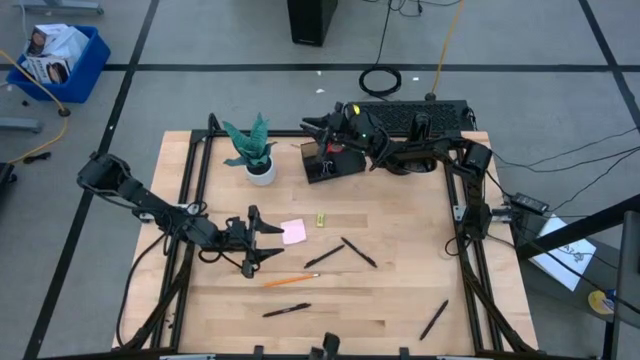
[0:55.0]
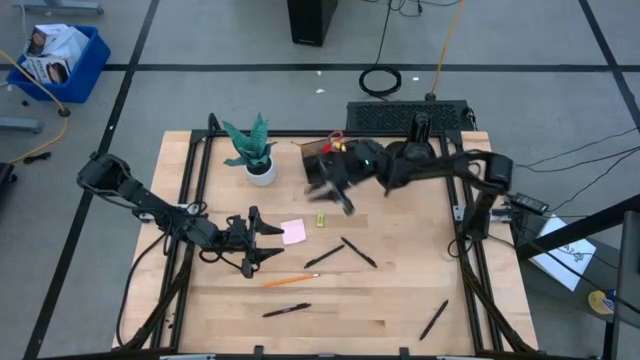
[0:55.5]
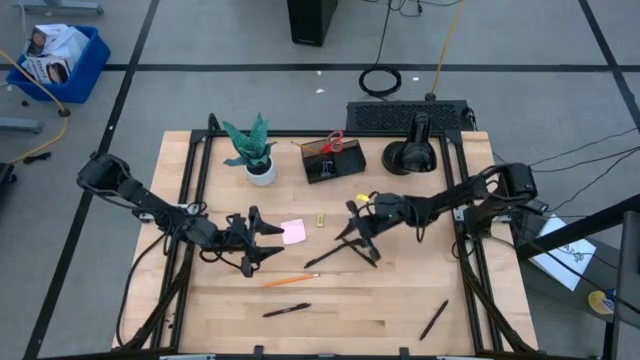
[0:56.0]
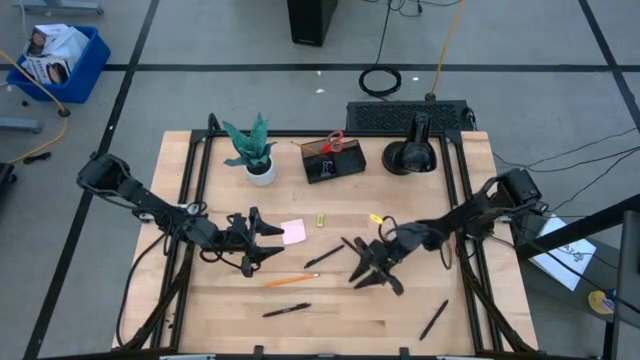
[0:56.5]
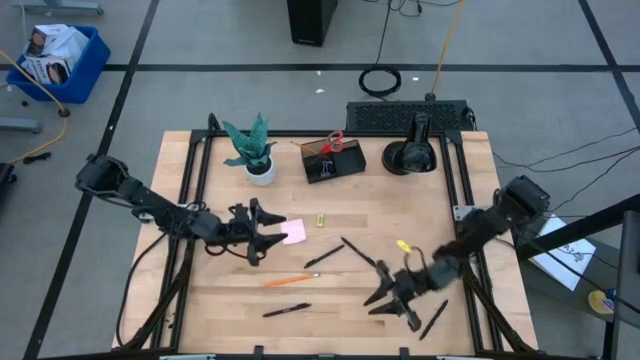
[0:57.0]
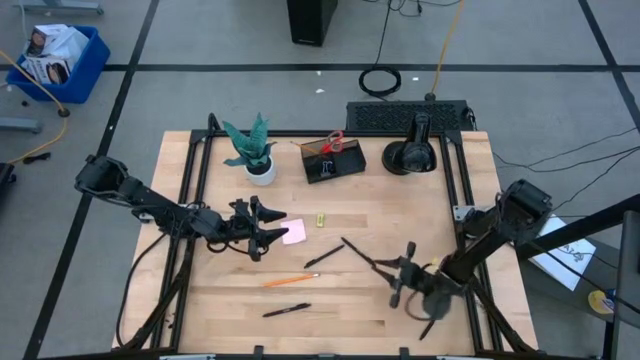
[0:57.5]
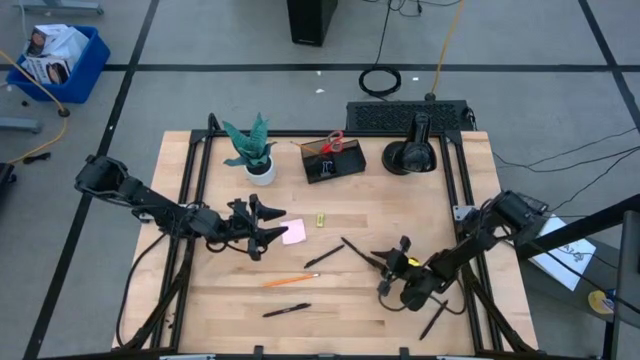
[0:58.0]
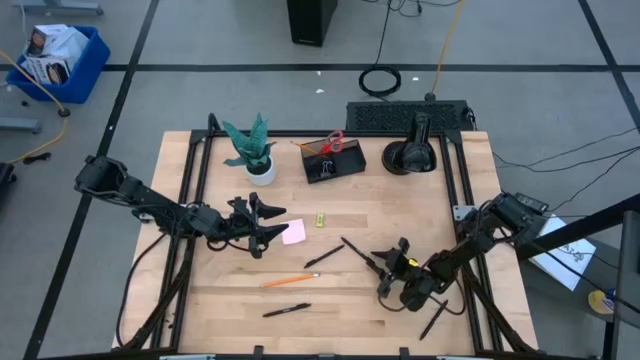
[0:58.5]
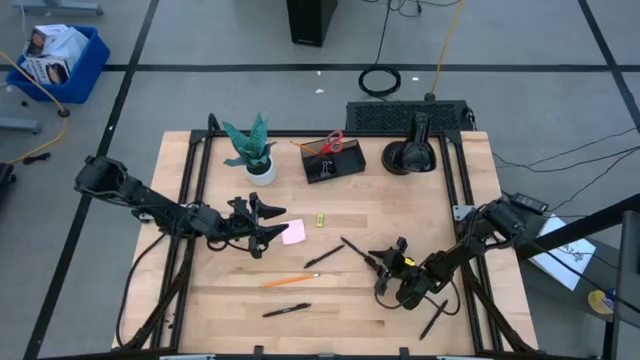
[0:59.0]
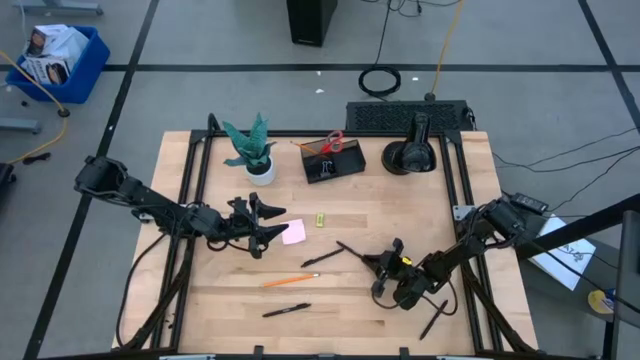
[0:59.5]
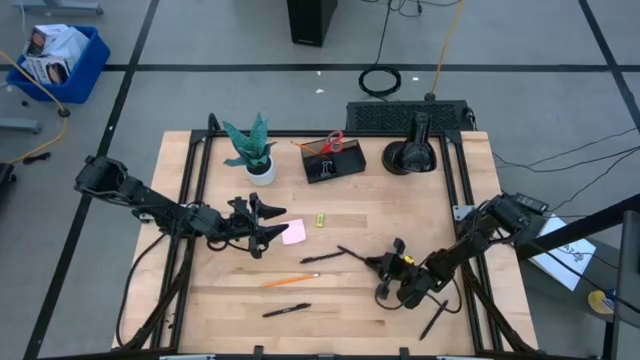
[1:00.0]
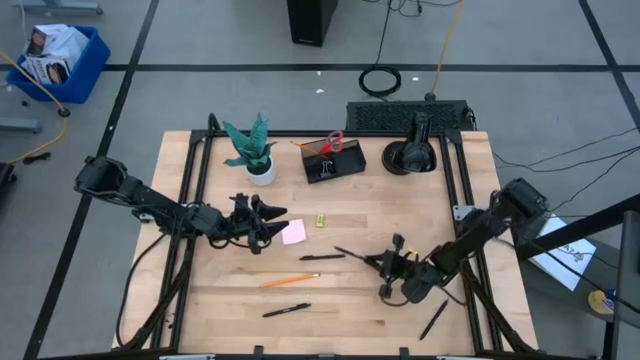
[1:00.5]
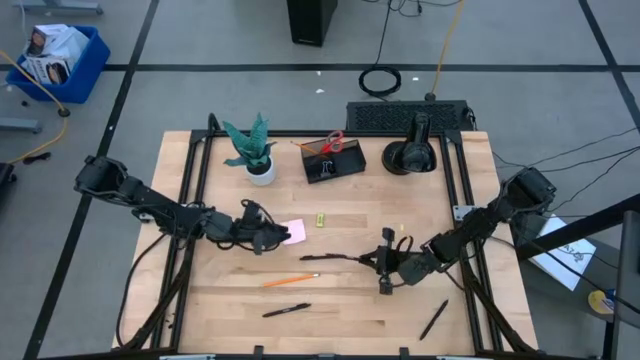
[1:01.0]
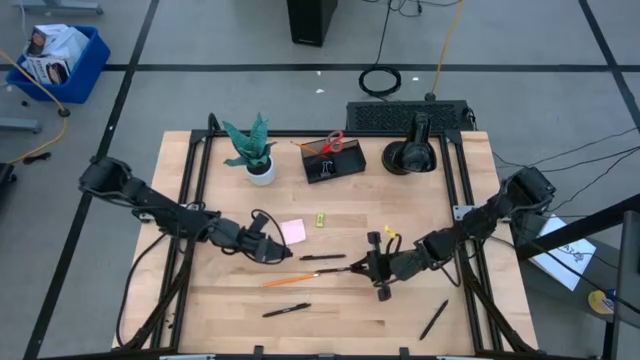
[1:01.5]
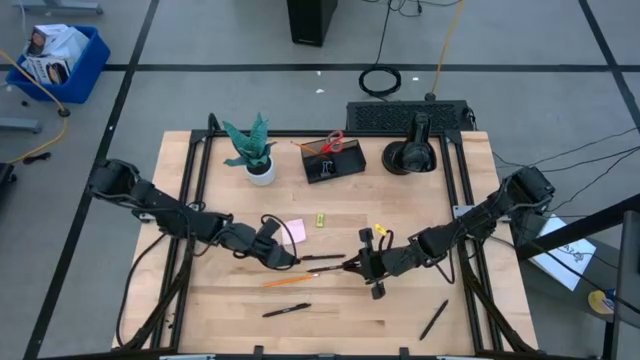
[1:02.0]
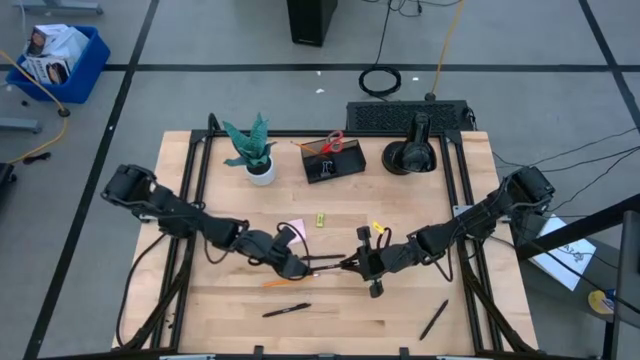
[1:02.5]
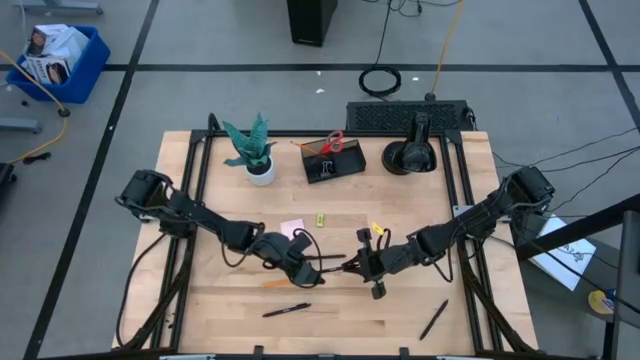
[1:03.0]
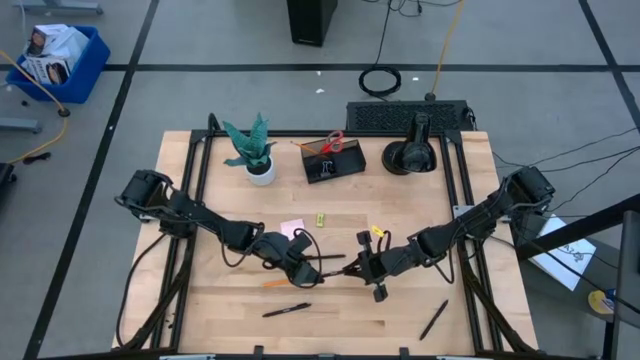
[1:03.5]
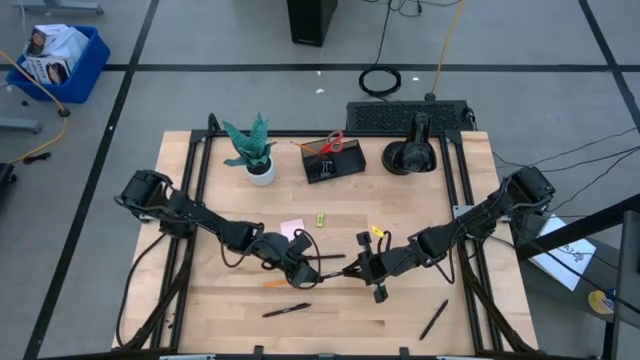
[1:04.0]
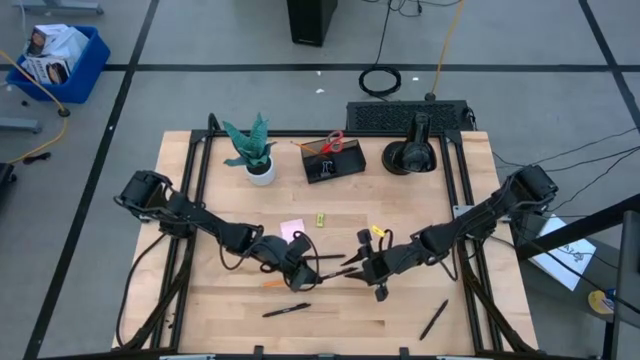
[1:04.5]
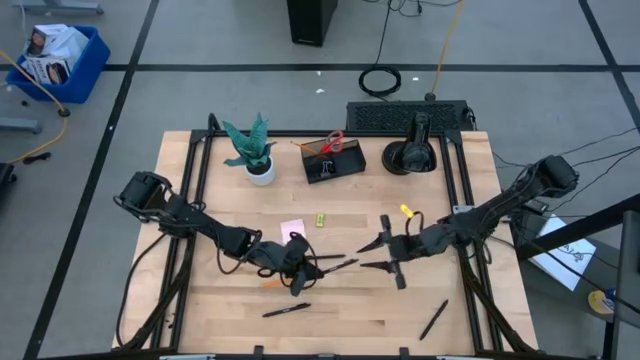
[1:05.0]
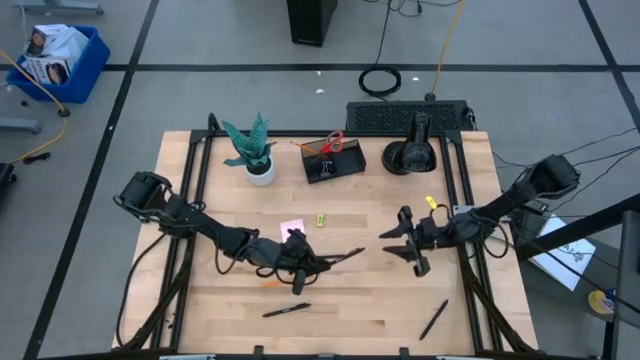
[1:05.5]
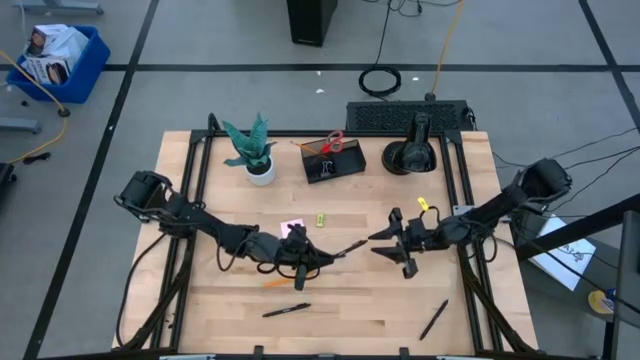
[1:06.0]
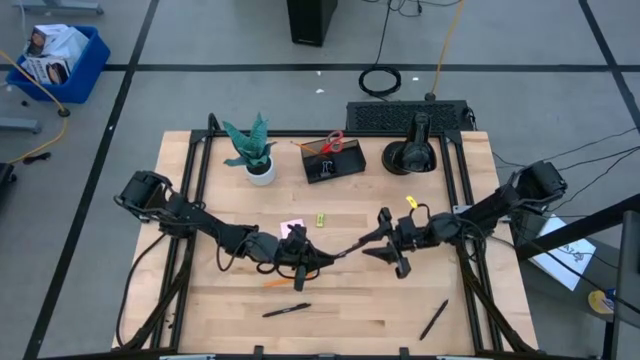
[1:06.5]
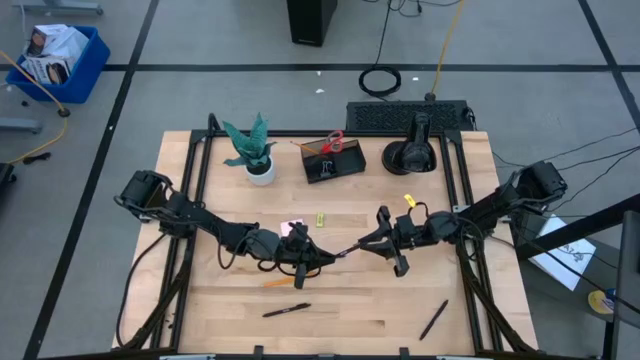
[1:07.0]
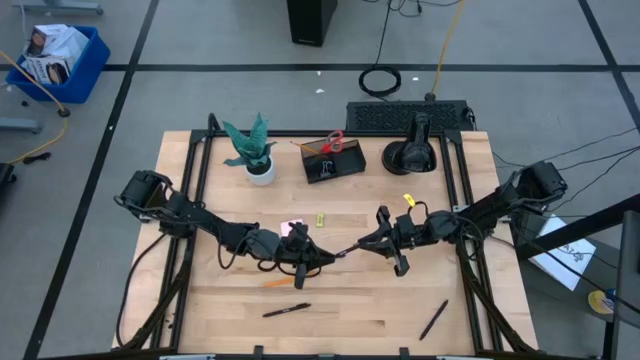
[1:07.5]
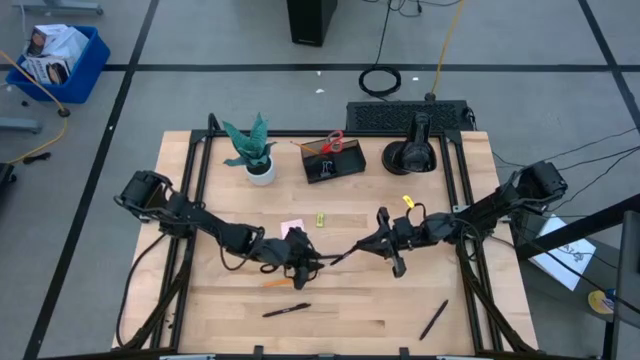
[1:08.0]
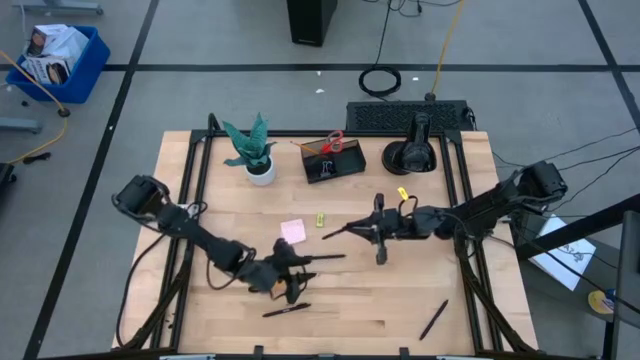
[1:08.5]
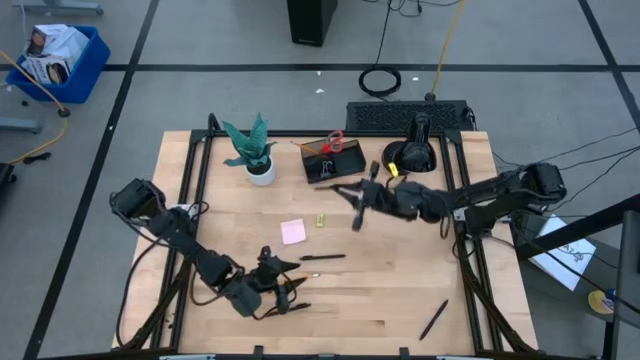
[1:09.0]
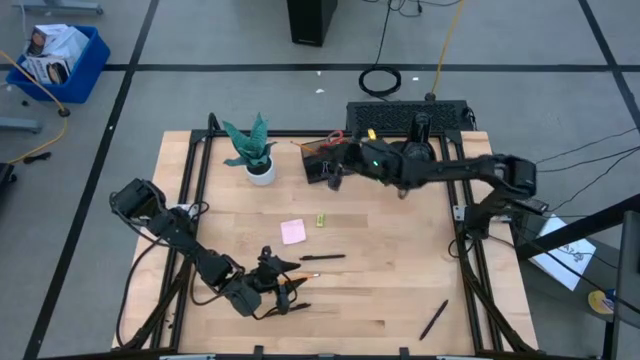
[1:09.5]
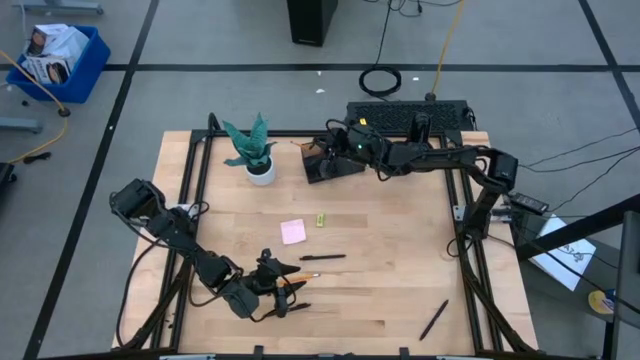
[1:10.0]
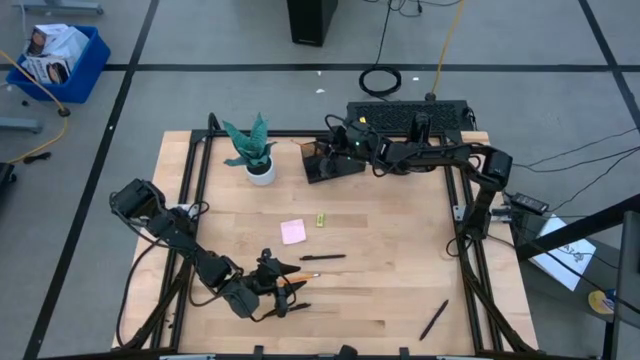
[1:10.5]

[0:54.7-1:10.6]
Task: Pick and place office supplies into organizer
Put the black pen into the black mesh desk organizer

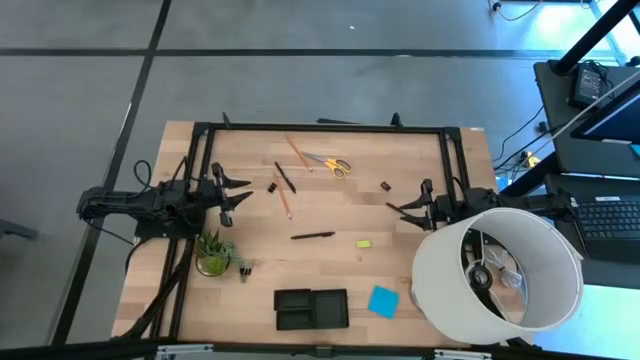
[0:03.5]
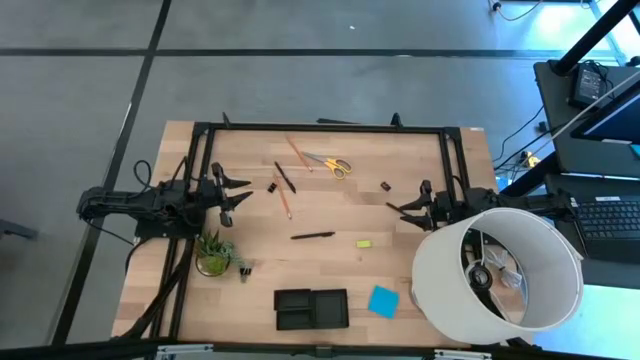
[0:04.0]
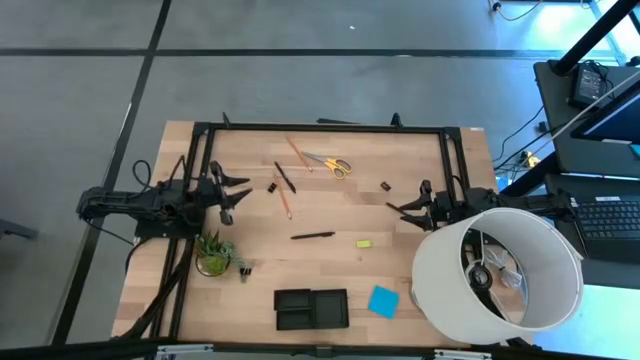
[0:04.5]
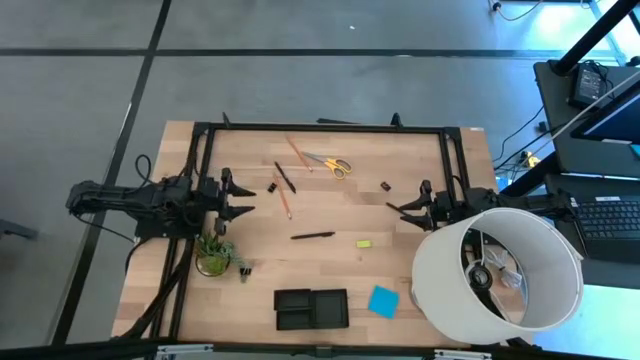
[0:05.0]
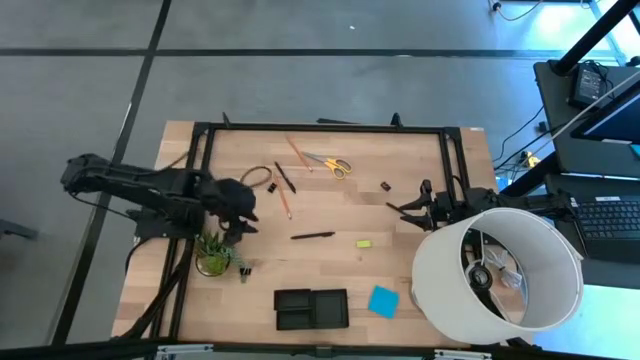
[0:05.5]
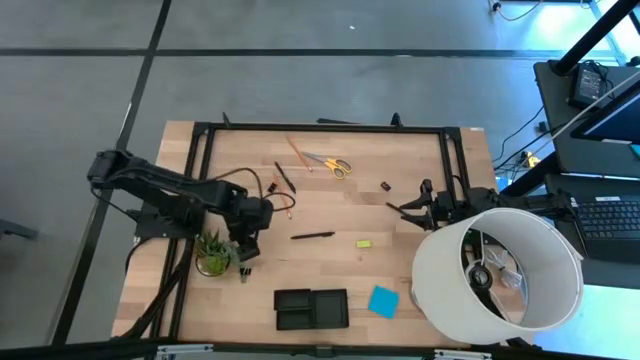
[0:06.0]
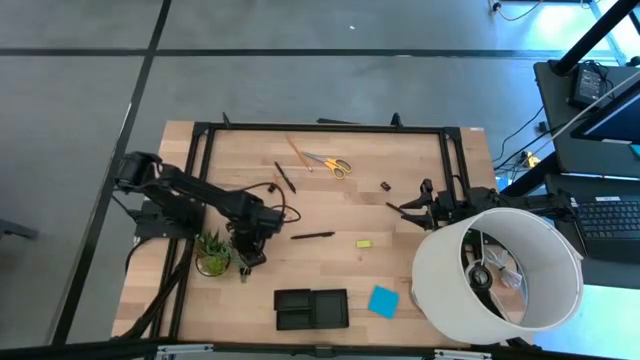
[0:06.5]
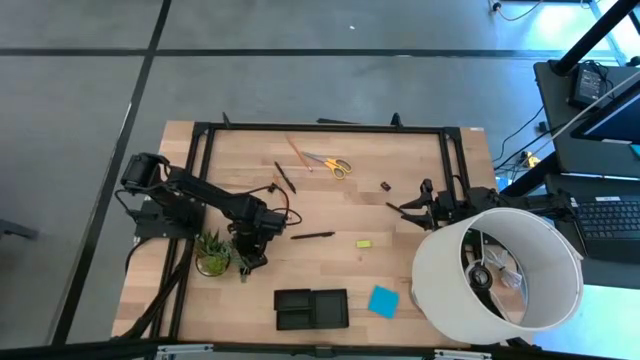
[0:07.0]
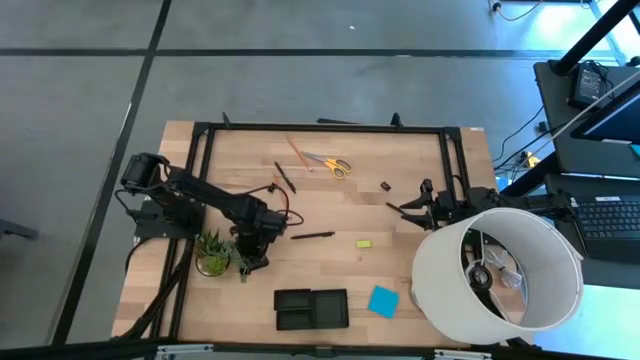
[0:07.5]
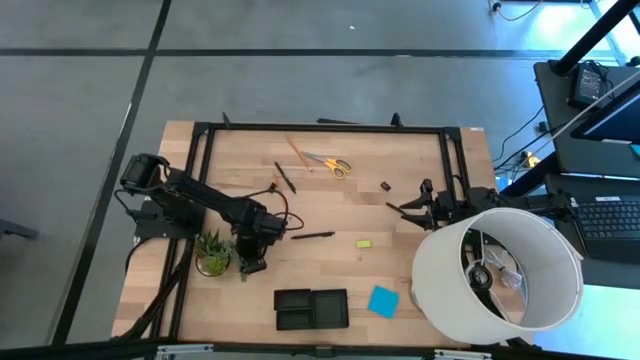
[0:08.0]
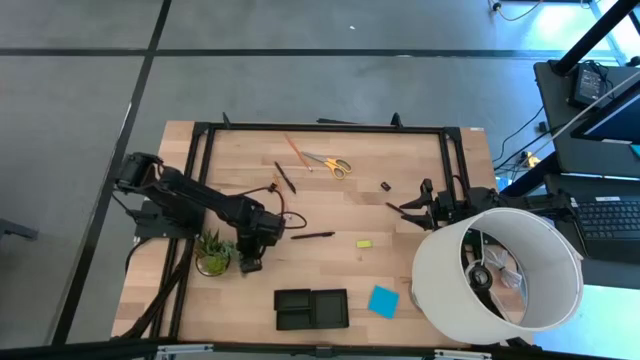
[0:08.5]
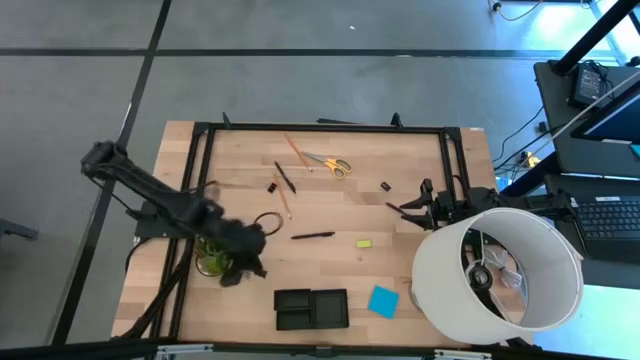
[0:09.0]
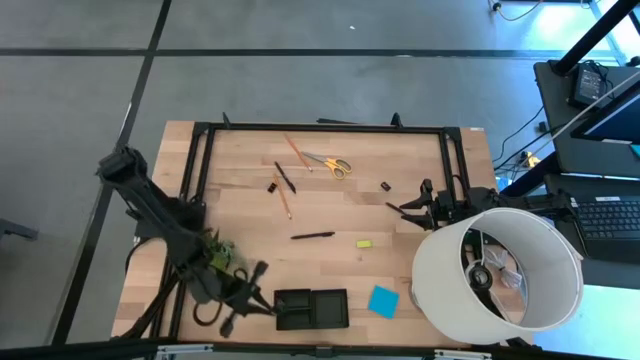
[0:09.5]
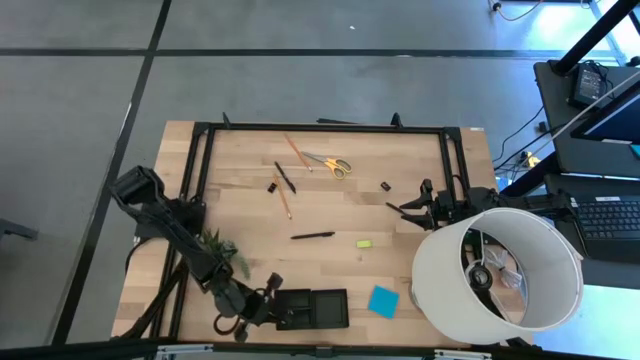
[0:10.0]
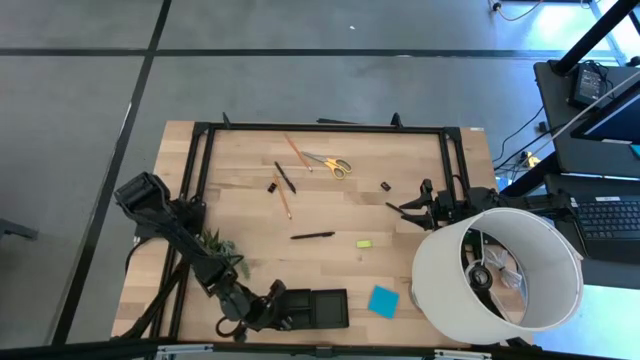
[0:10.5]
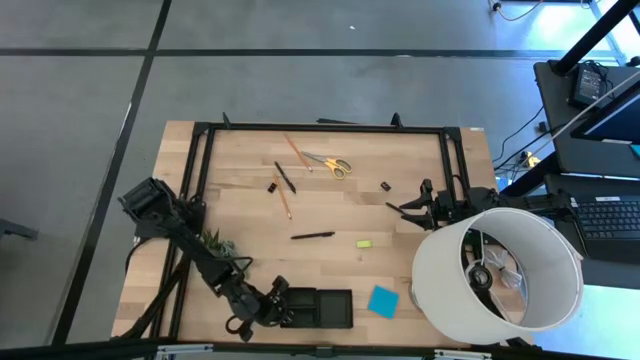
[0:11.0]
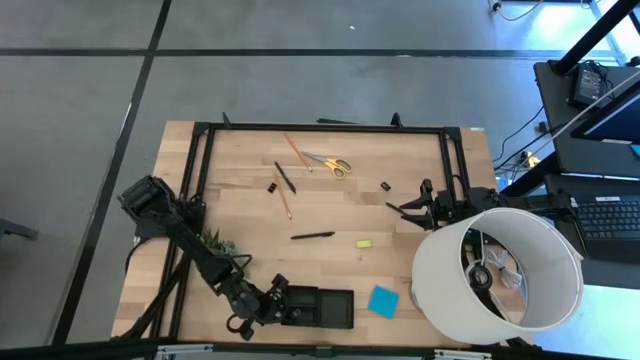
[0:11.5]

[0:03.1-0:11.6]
Task: Pick and place office supplies into organizer
Put the bottom black binder clip into the black desk organizer
